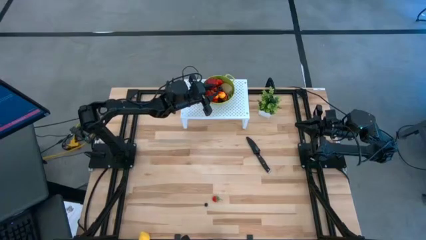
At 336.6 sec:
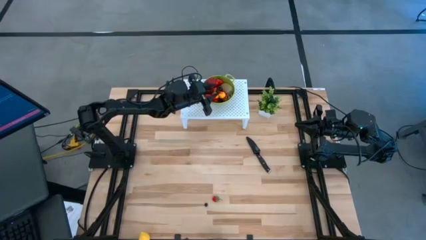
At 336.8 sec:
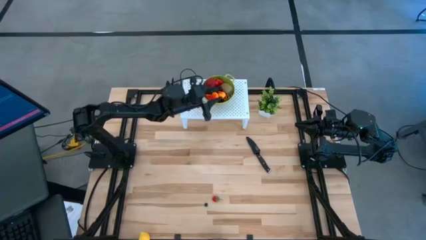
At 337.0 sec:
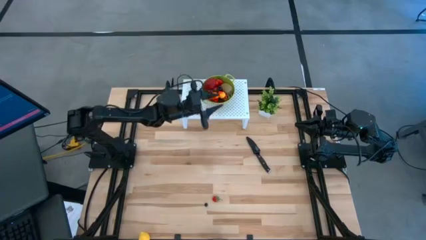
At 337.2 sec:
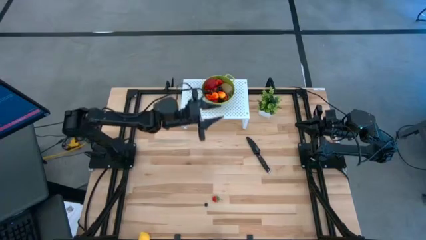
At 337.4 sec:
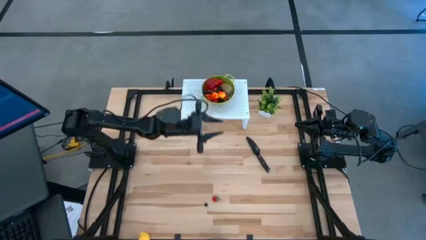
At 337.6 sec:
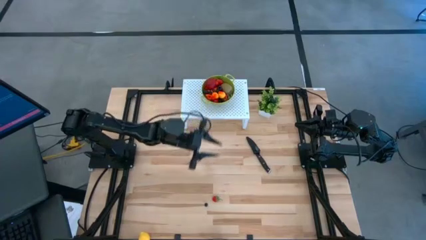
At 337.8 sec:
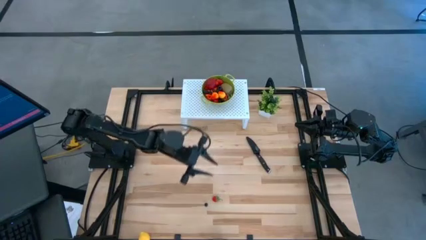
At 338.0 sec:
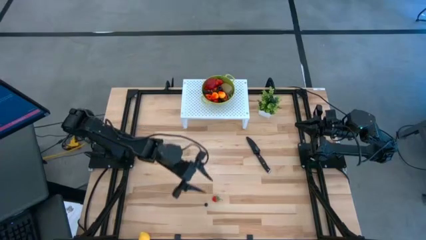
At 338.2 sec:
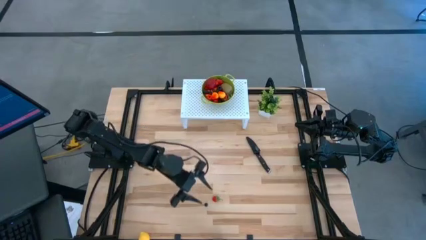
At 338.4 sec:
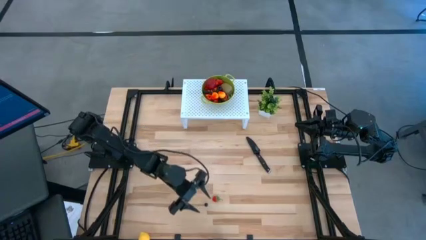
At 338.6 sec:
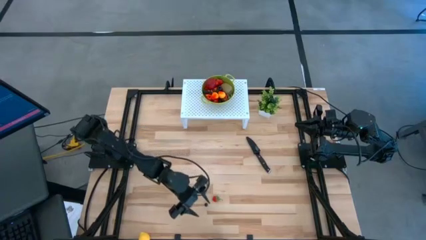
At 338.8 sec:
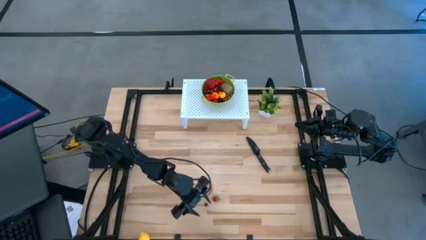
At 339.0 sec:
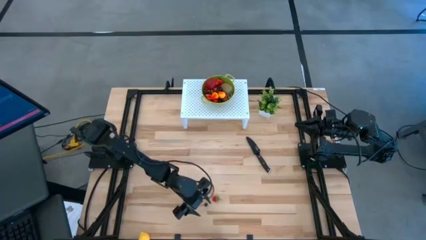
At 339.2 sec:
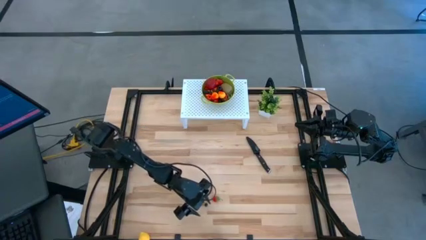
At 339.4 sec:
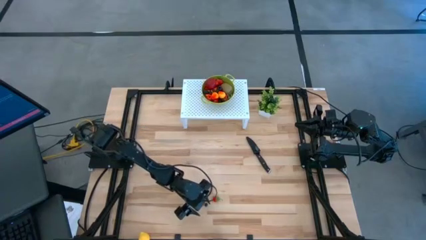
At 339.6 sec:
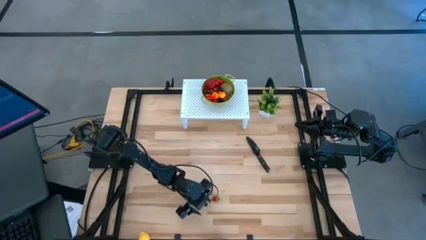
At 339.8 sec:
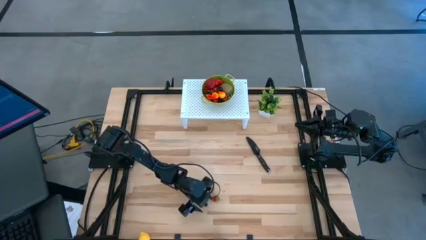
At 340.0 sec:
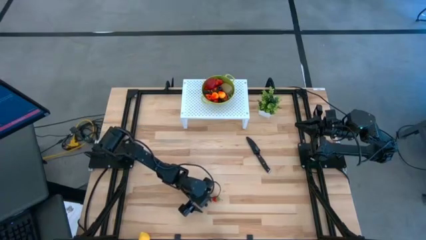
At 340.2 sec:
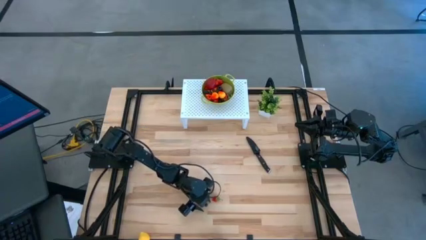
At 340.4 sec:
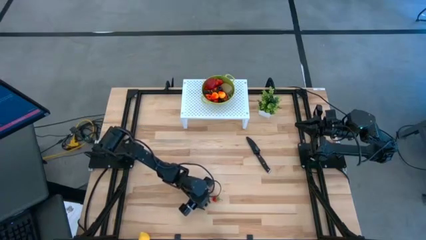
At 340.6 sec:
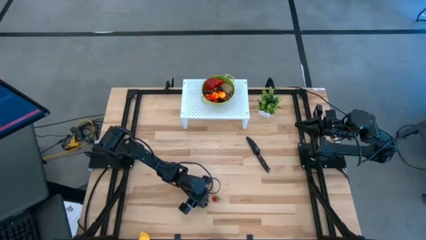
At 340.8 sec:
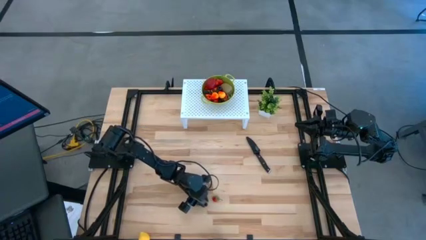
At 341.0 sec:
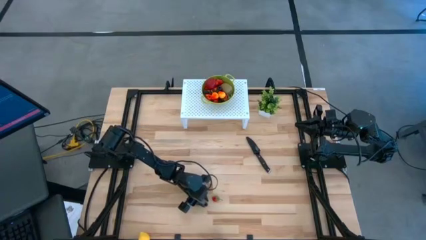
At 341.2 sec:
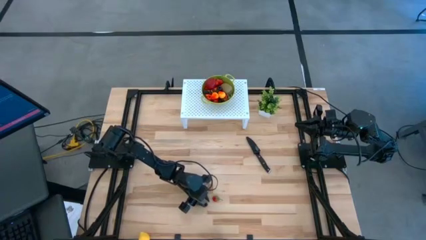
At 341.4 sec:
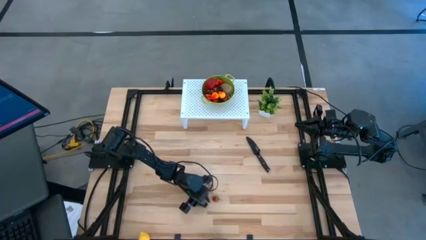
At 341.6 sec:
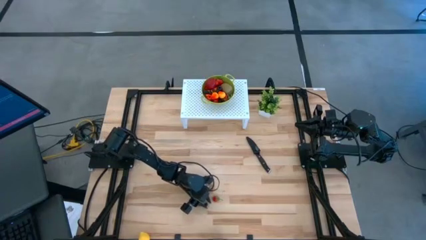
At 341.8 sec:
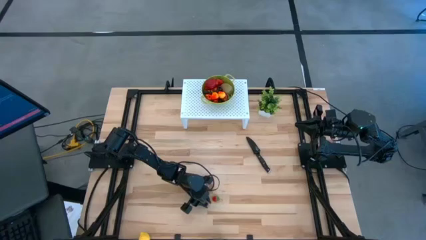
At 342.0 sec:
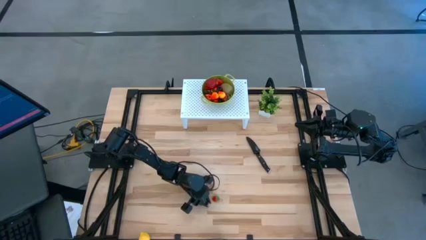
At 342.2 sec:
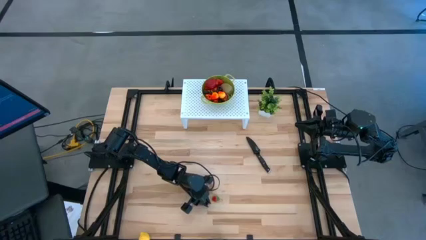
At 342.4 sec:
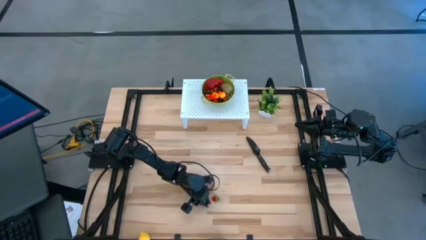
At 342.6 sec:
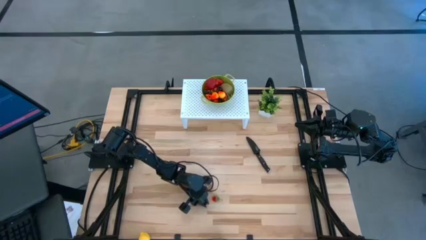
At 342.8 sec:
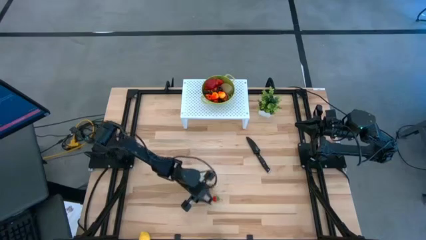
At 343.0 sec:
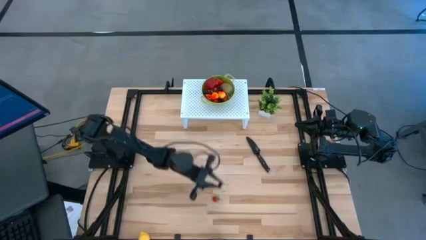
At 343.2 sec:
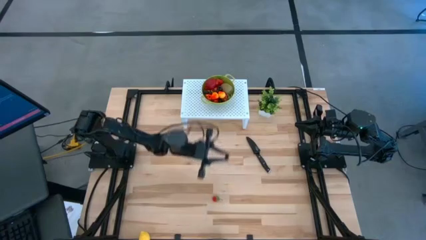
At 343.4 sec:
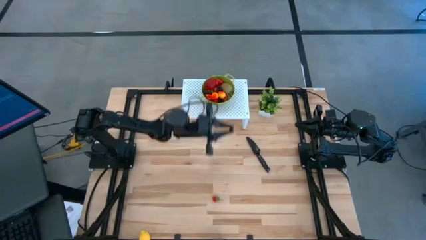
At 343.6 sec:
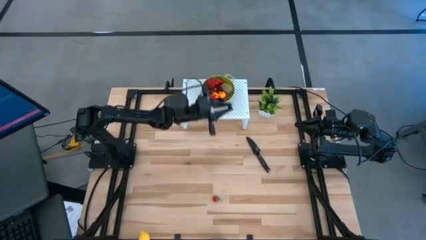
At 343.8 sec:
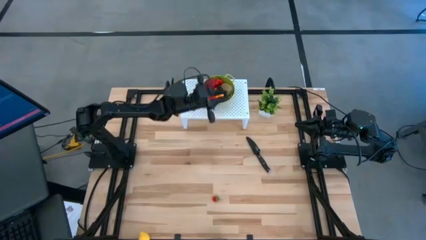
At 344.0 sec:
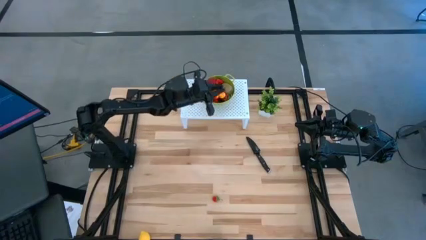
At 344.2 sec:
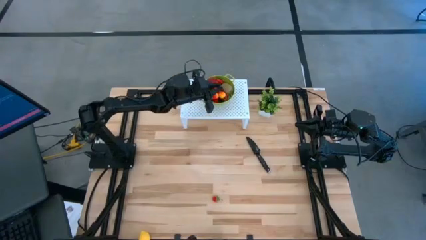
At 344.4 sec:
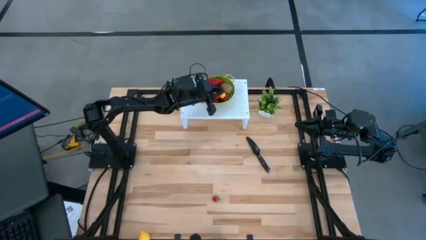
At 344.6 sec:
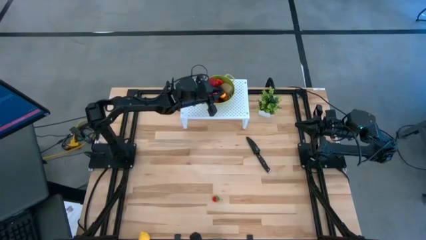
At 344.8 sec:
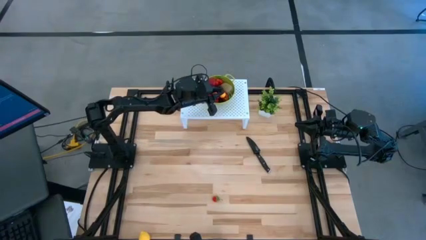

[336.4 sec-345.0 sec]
Task: Pick & Place Fruit
Put the black blueberry into the green strainer bowl

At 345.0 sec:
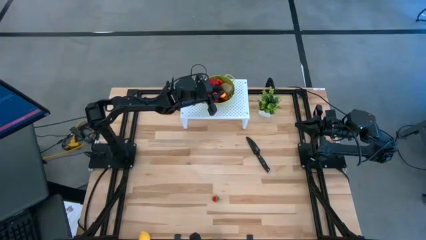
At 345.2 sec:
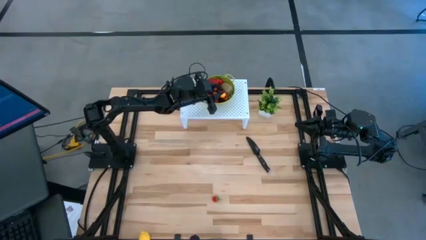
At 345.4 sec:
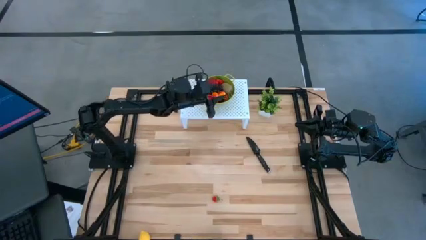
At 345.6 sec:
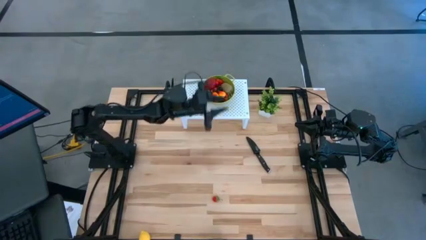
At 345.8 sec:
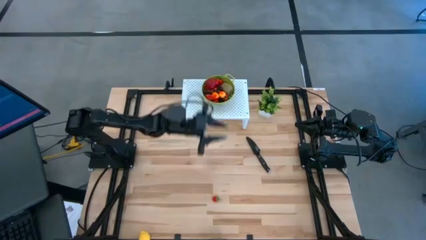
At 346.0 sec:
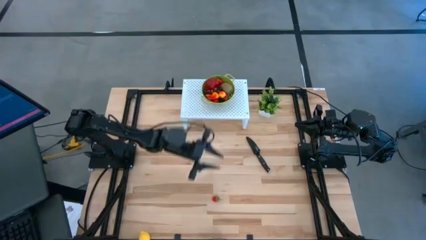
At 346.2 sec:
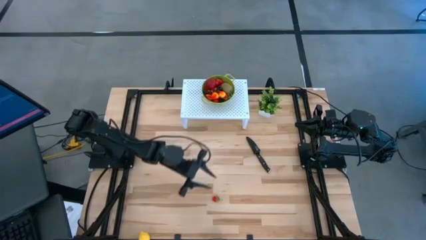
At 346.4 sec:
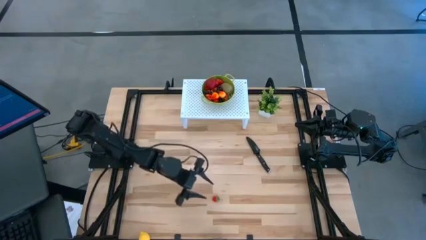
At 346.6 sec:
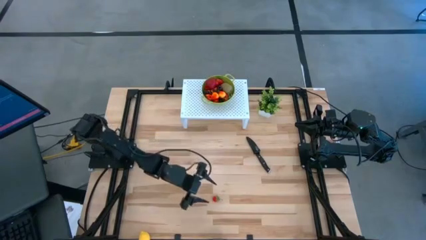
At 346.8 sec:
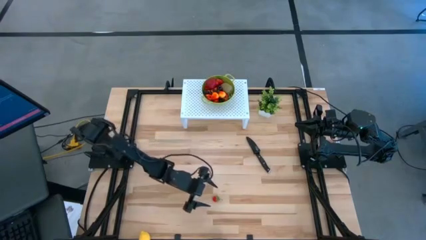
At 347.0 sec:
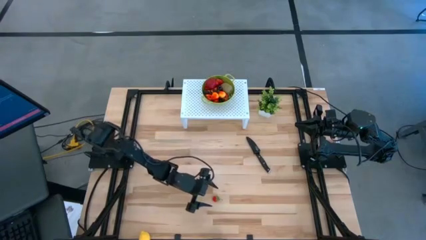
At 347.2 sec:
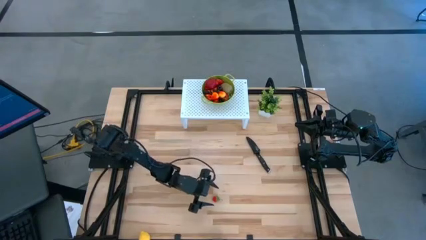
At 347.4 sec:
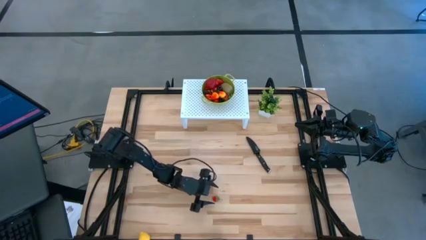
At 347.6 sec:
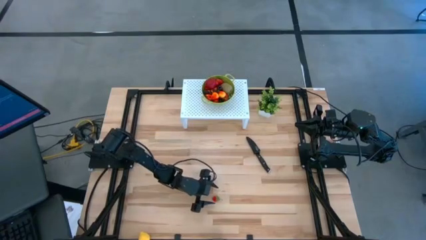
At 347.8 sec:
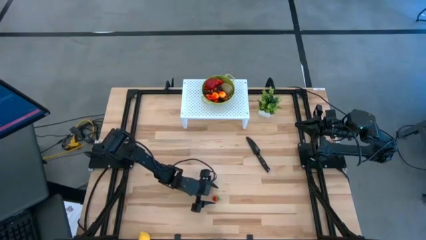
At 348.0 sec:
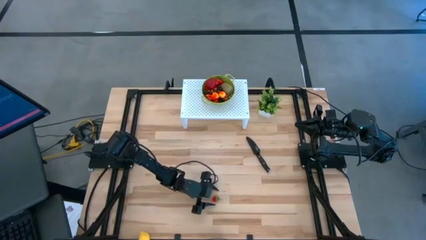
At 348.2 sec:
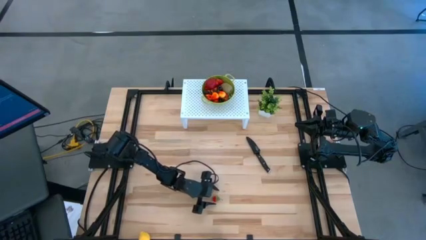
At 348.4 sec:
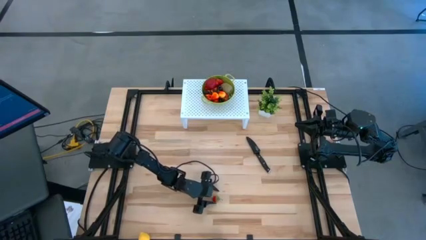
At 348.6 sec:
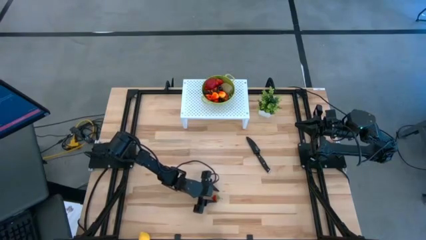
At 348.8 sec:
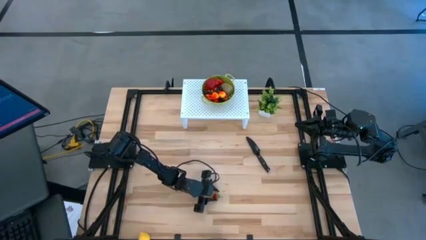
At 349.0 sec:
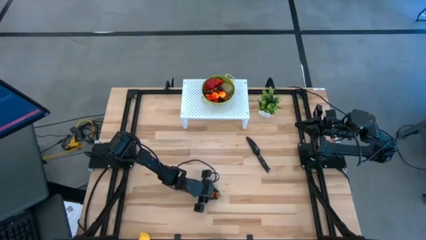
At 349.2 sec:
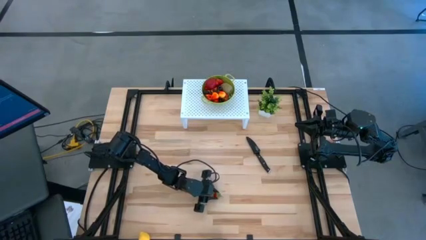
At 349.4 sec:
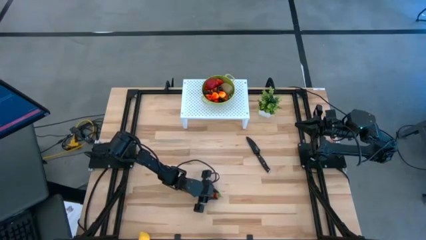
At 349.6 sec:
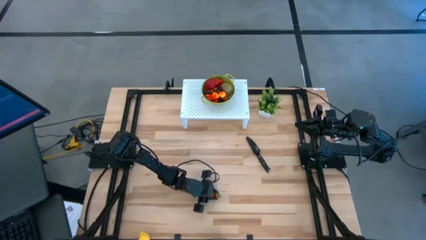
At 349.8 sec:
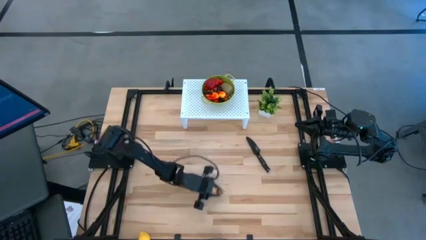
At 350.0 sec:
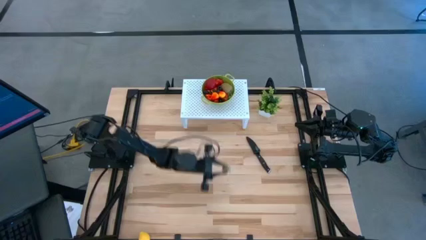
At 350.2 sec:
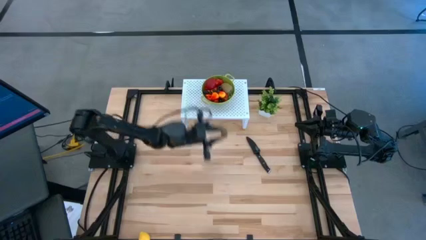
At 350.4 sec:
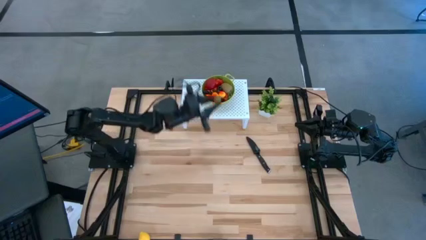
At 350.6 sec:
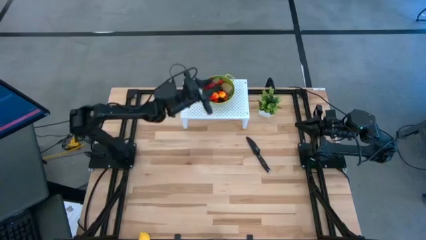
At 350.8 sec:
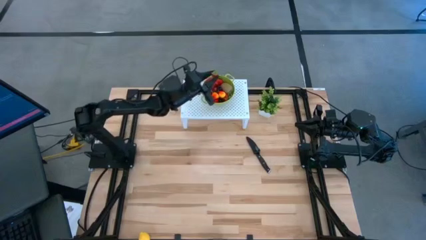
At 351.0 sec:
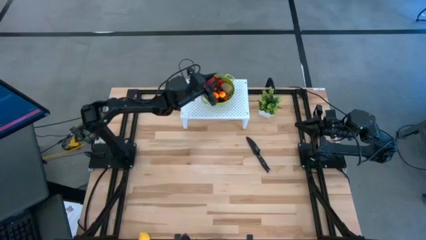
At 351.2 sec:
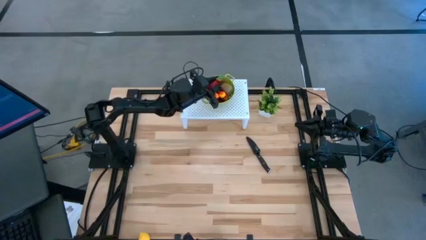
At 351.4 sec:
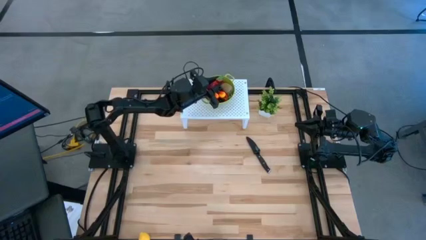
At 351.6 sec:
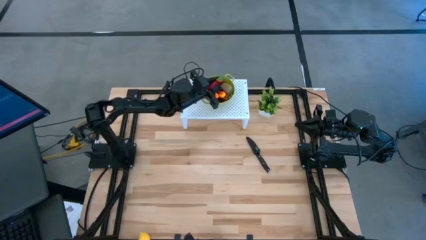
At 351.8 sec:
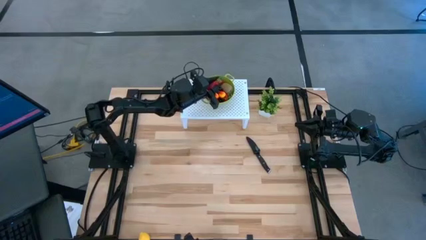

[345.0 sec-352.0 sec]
Put the red cherry into the green strainer bowl
